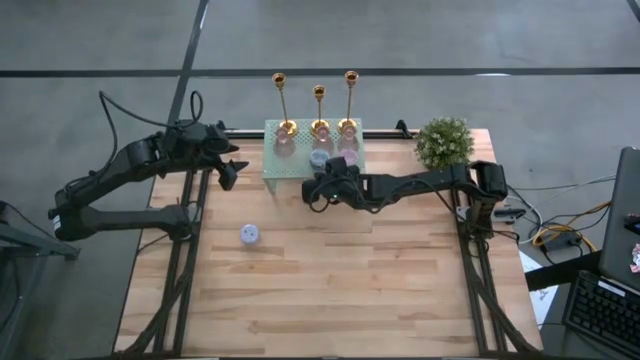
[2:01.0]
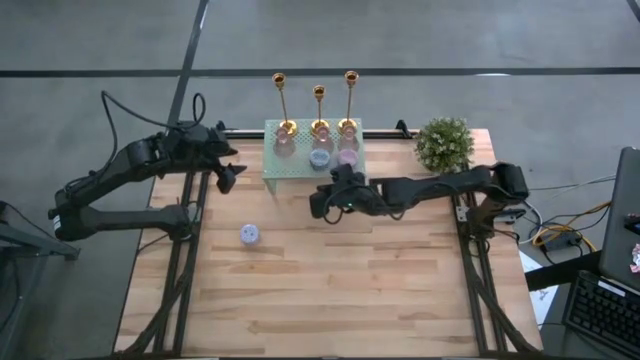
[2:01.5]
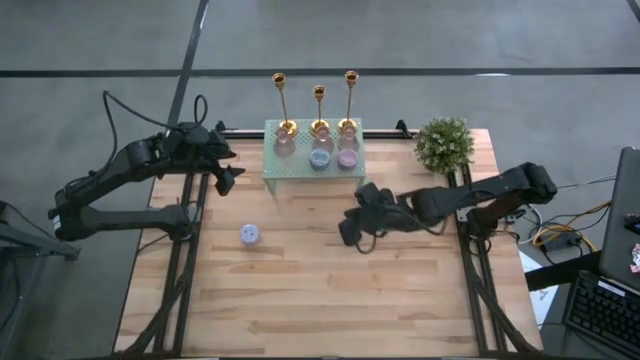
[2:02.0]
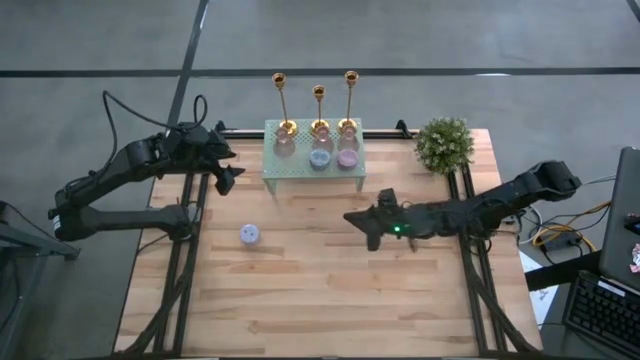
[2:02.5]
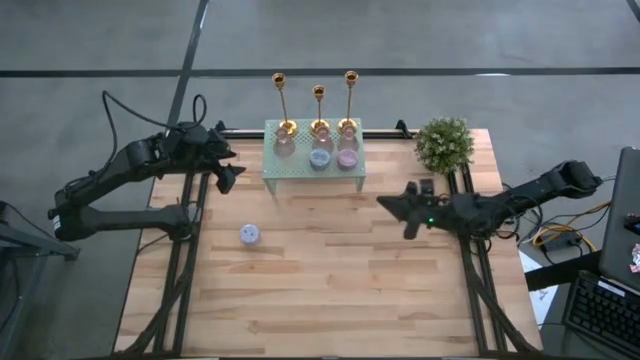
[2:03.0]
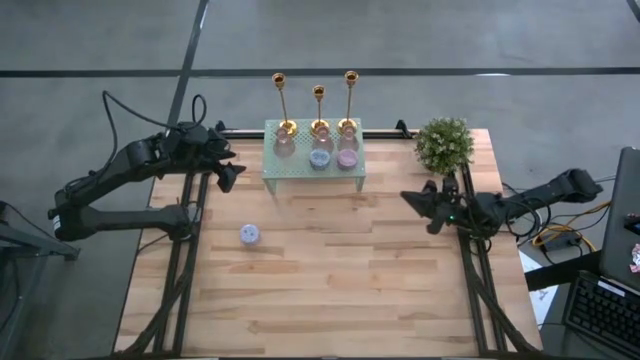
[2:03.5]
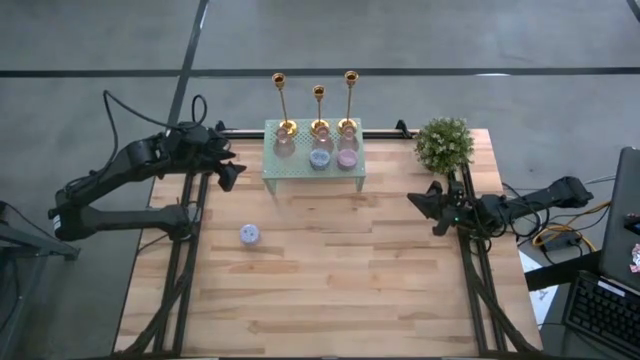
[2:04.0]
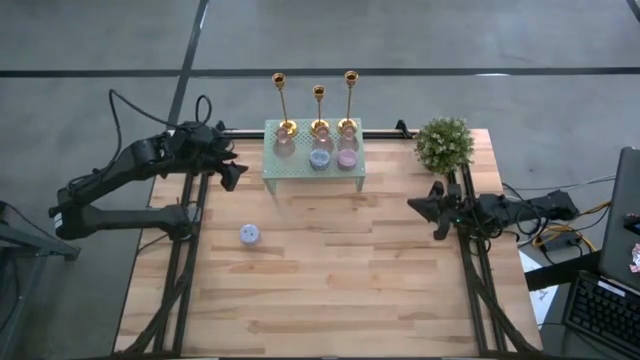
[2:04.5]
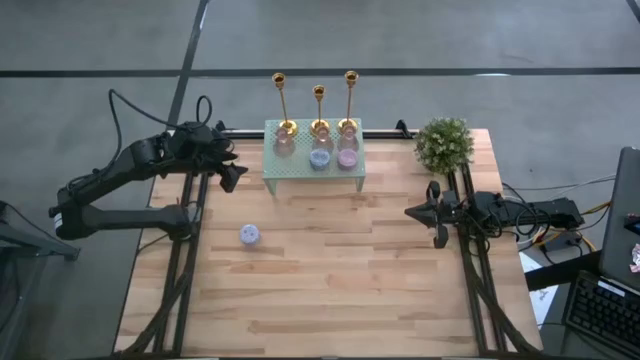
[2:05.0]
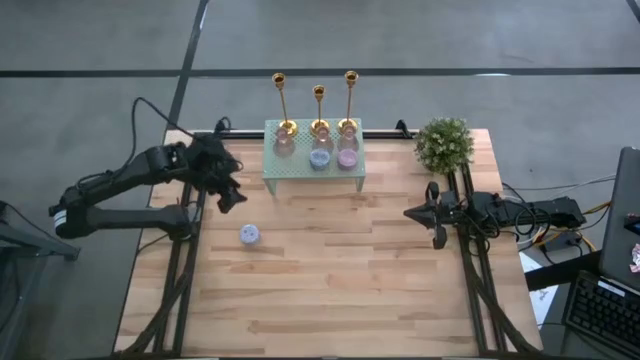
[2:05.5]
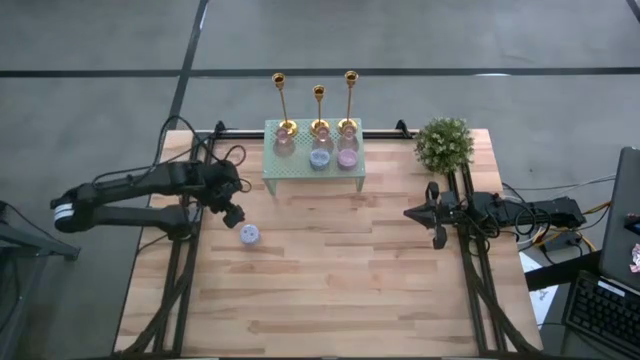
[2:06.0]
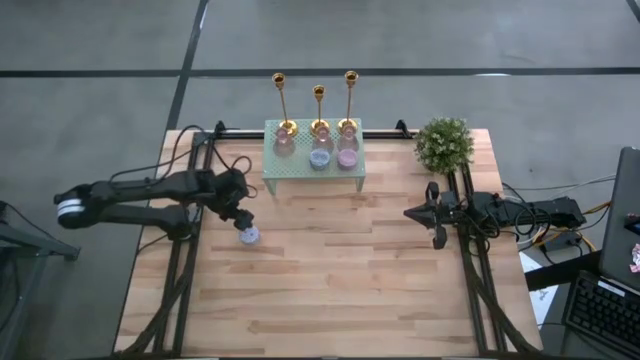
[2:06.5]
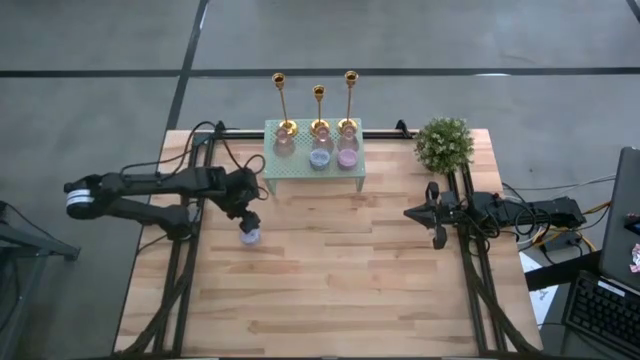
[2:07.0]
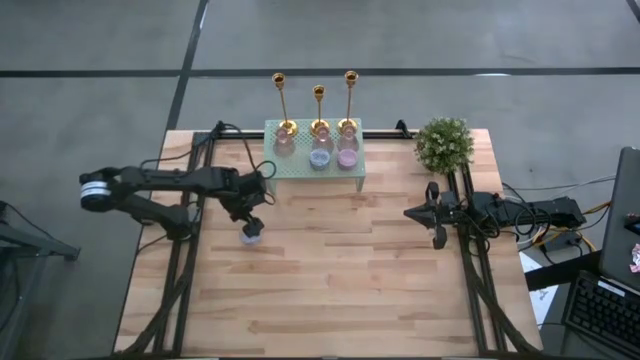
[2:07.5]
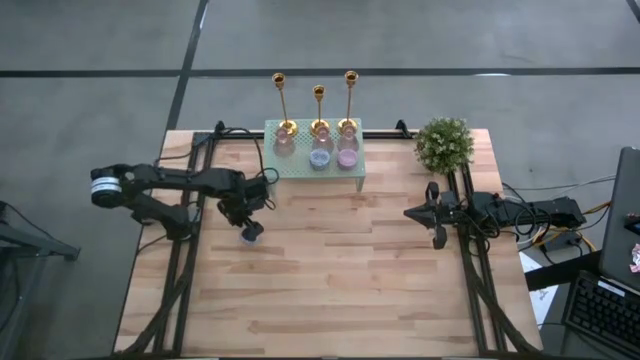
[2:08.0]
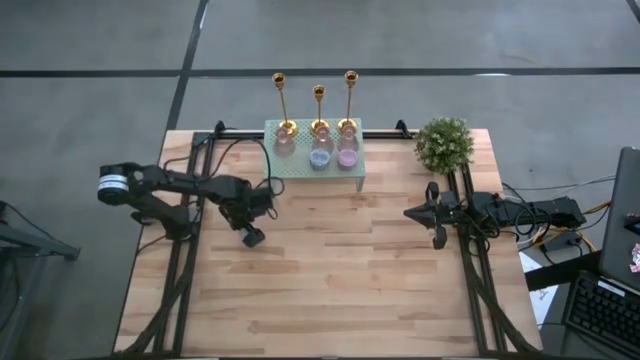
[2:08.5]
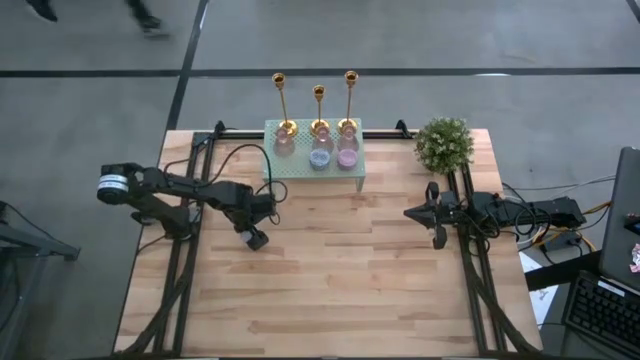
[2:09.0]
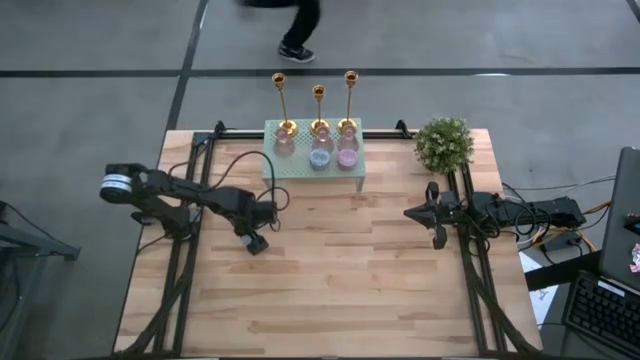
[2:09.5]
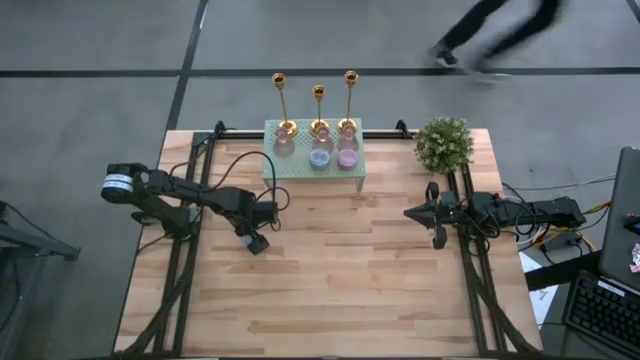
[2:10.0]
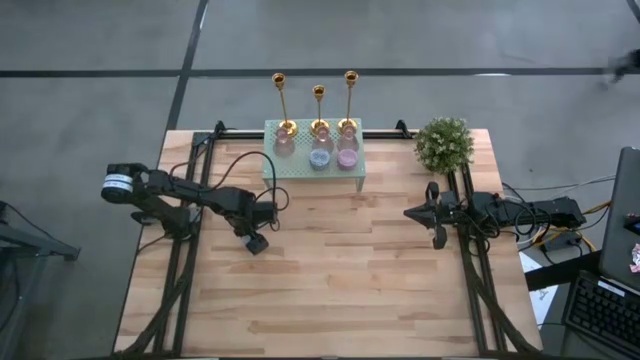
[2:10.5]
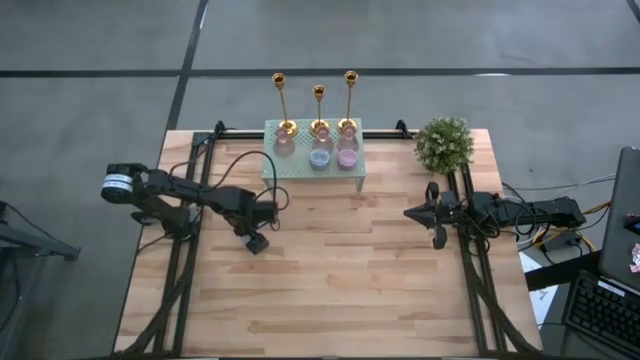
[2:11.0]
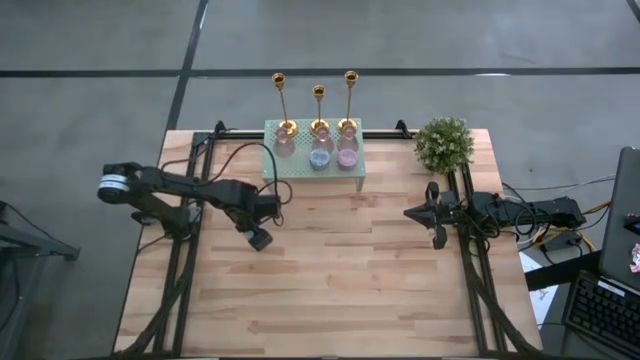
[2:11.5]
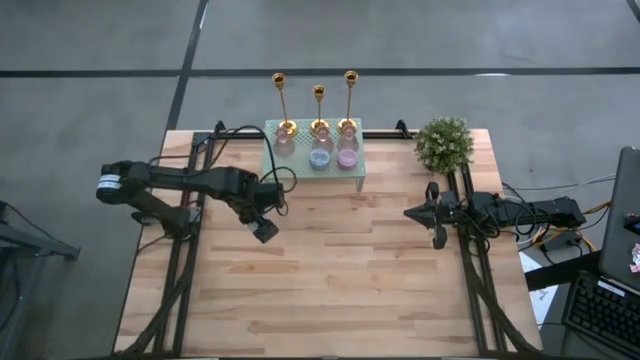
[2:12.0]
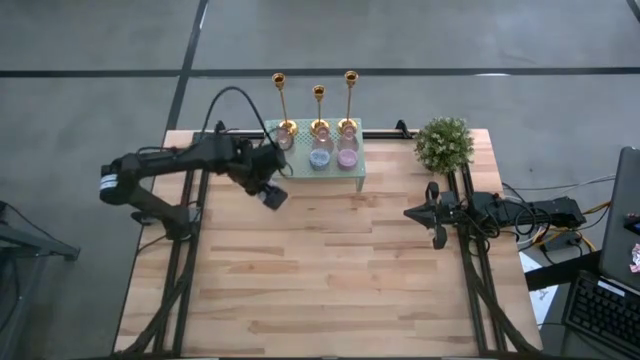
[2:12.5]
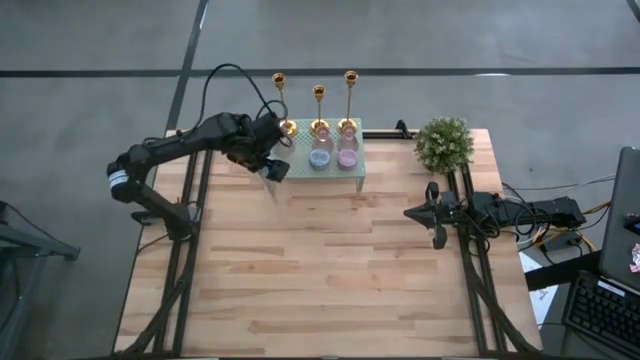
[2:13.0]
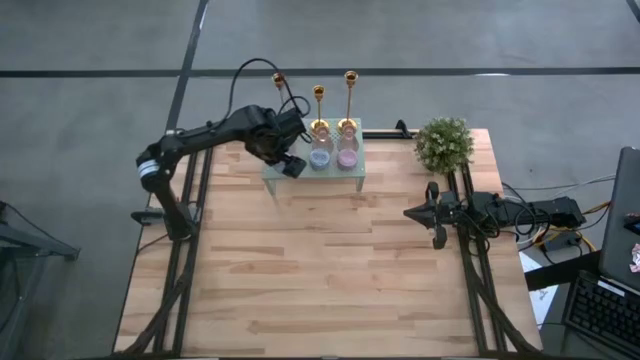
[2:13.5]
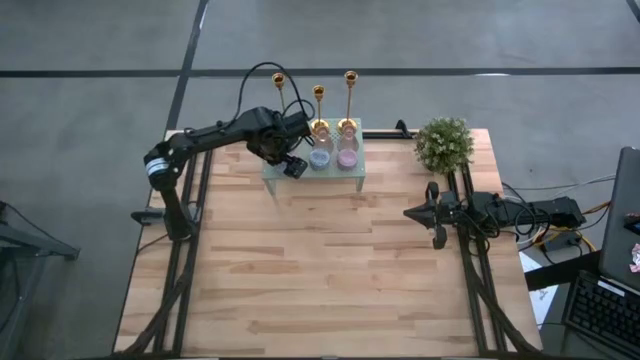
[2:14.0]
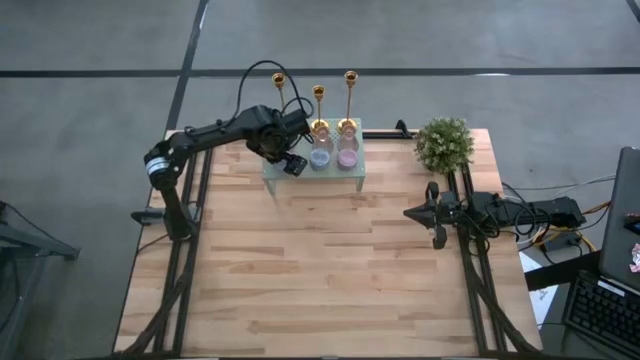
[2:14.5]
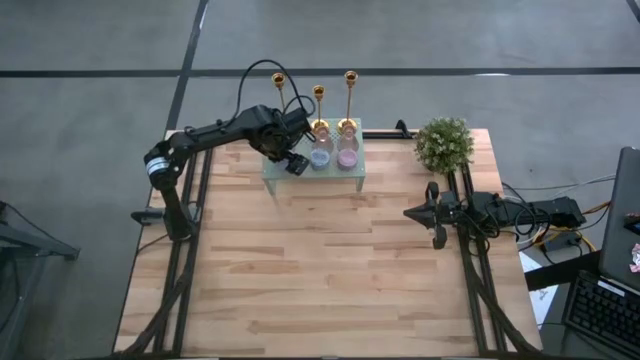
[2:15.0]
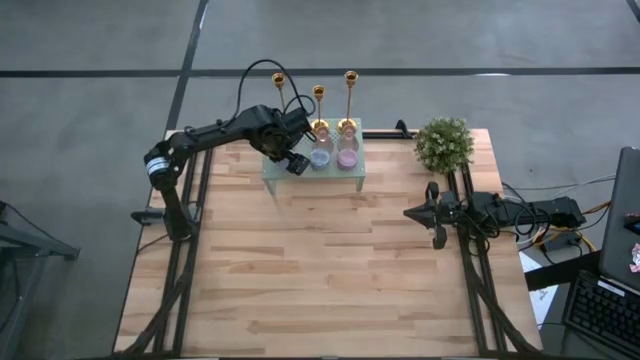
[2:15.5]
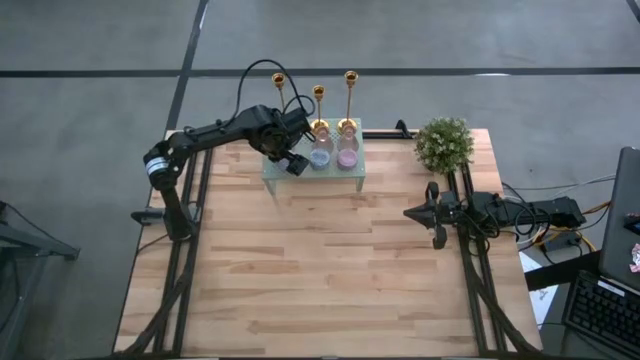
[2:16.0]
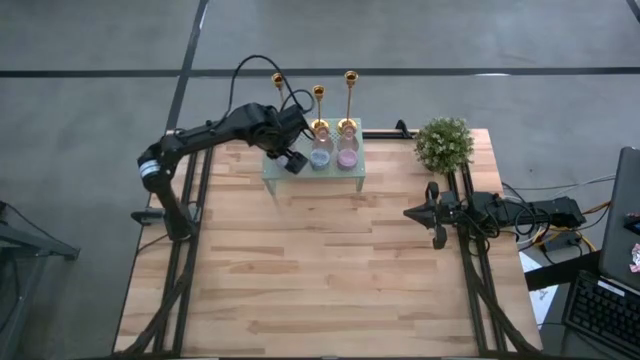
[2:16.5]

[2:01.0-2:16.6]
Task: Pick & Place candle stick holders
Put the red scented candle on the shelf

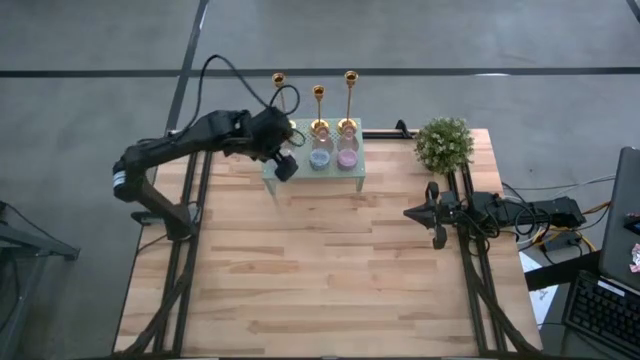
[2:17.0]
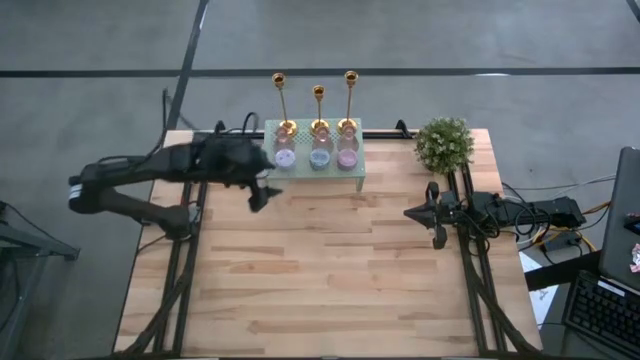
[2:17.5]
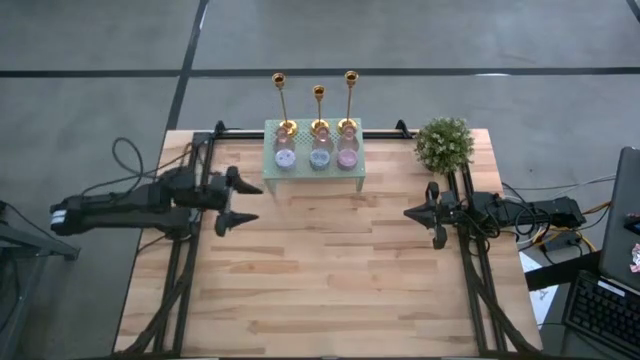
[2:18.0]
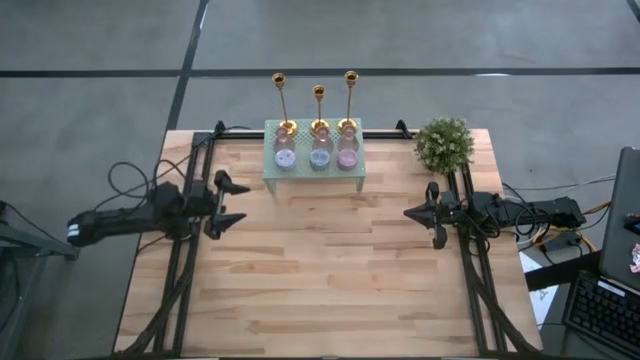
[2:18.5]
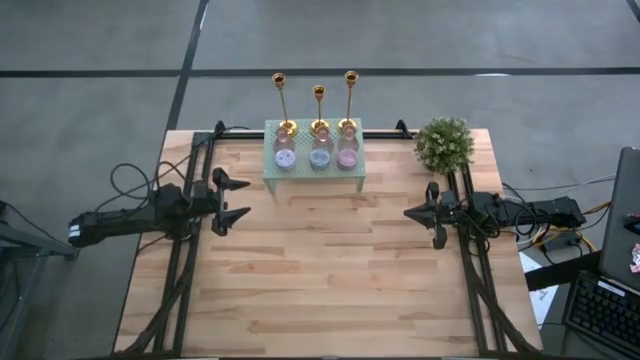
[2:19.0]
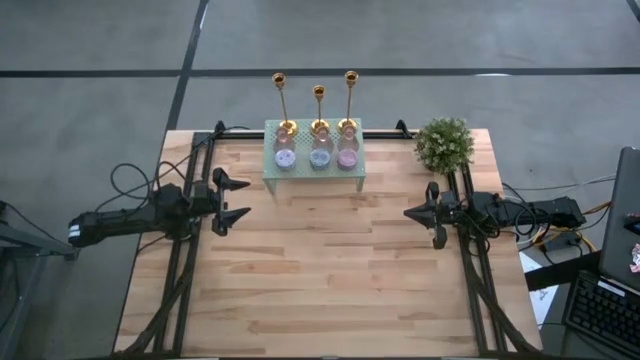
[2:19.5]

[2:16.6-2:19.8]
Return to Home Position
